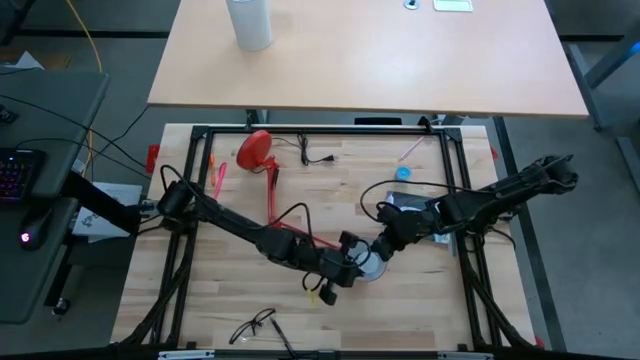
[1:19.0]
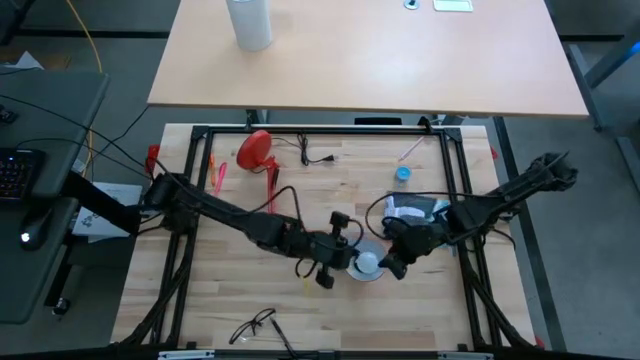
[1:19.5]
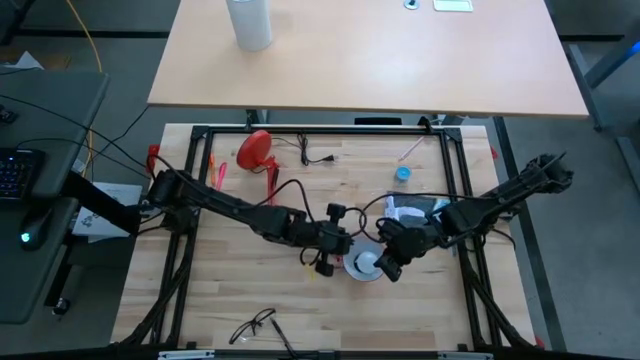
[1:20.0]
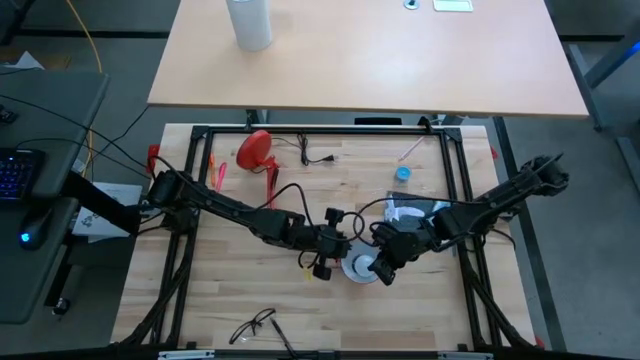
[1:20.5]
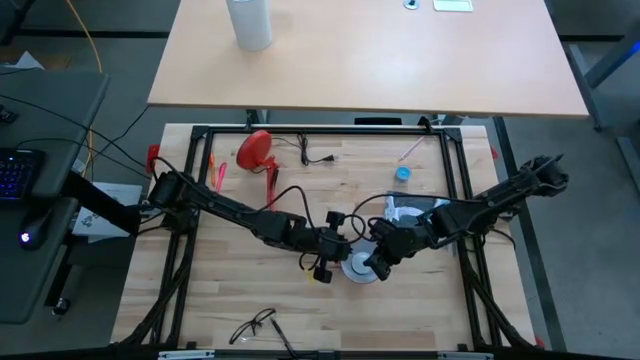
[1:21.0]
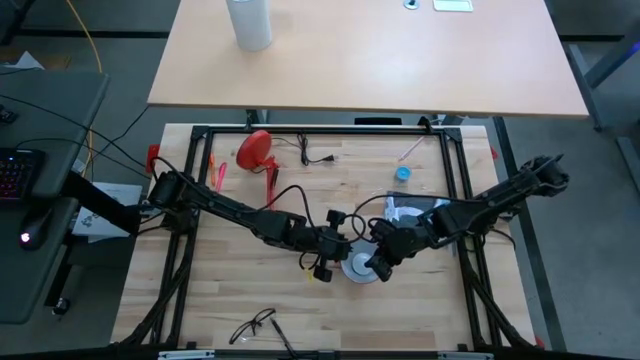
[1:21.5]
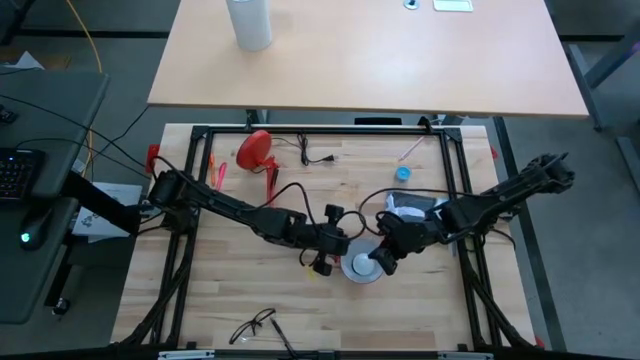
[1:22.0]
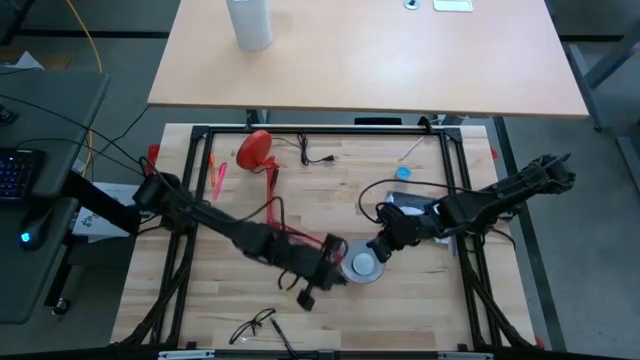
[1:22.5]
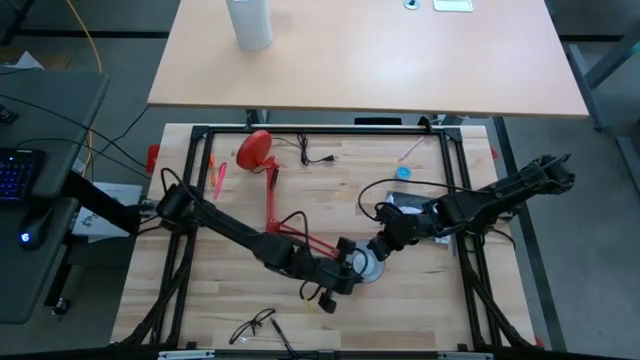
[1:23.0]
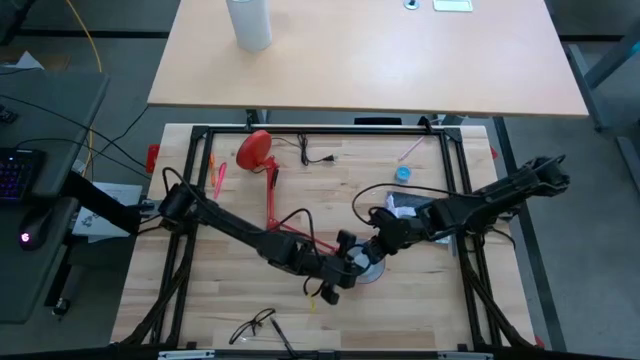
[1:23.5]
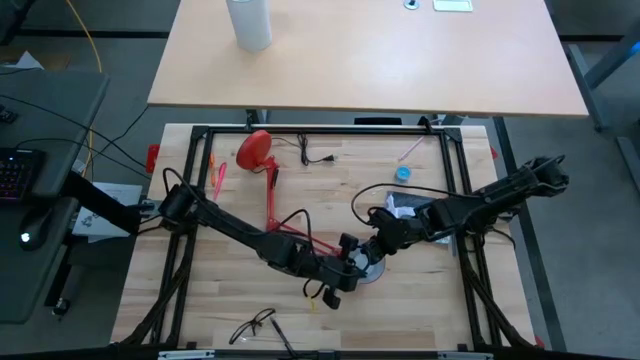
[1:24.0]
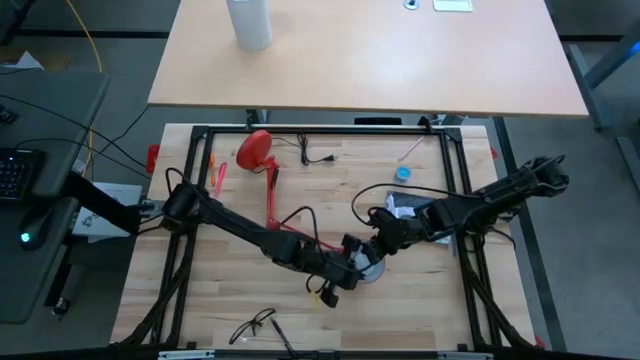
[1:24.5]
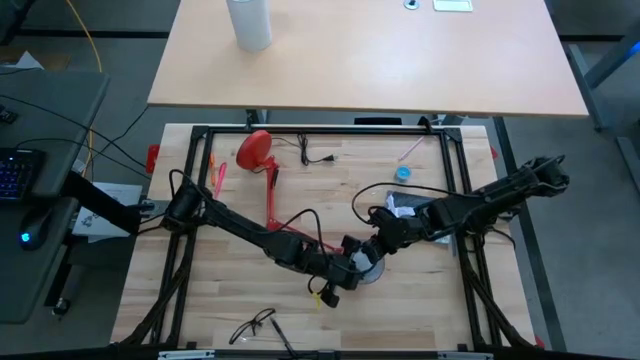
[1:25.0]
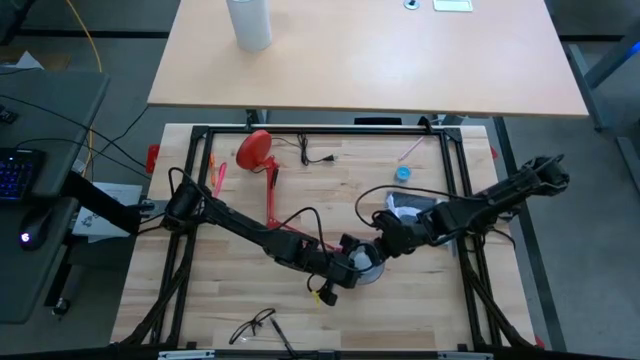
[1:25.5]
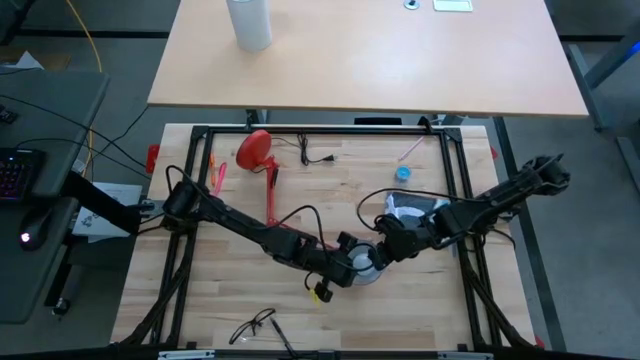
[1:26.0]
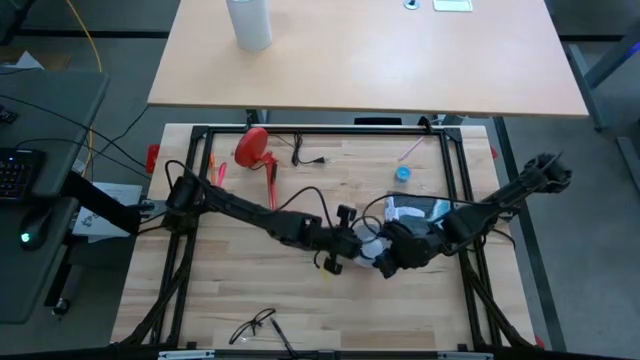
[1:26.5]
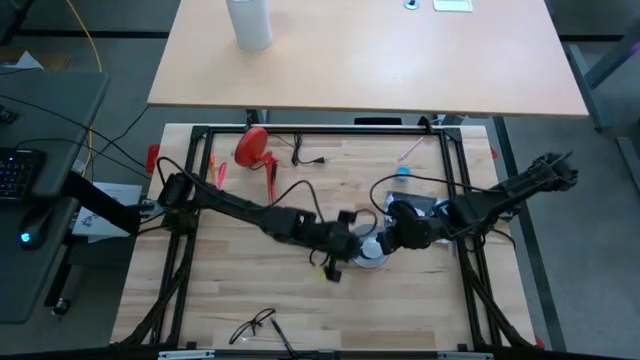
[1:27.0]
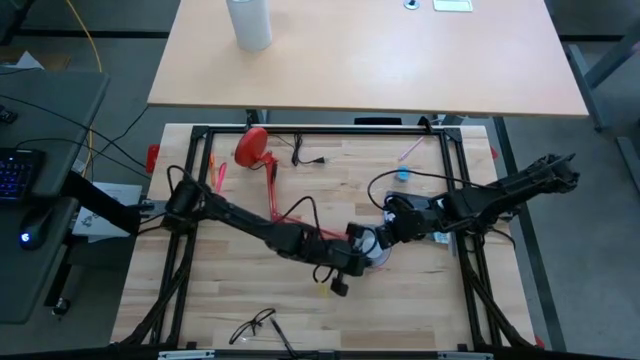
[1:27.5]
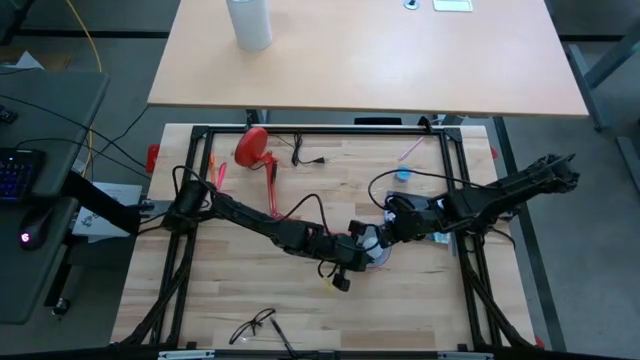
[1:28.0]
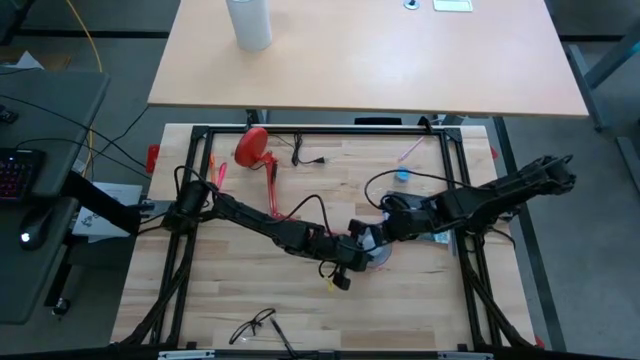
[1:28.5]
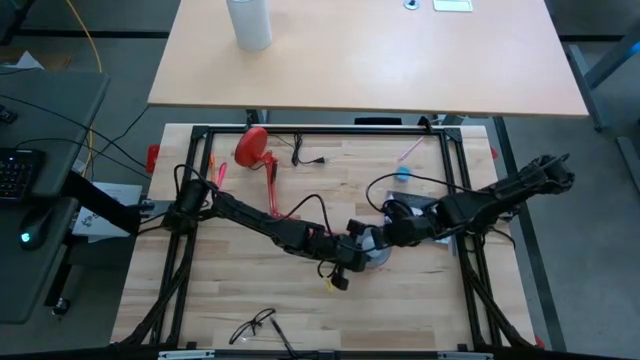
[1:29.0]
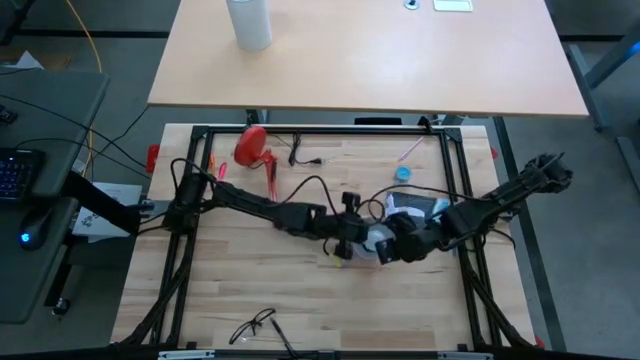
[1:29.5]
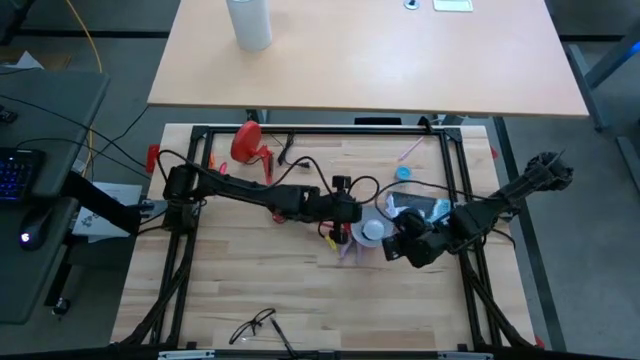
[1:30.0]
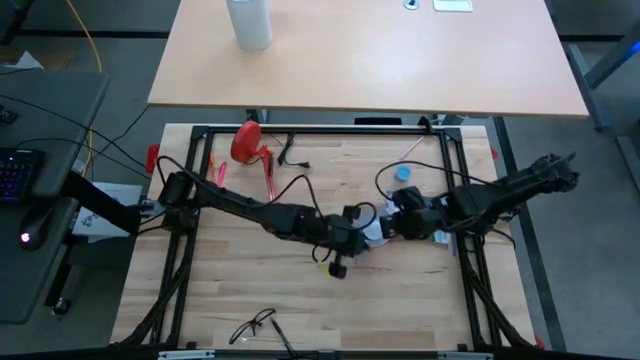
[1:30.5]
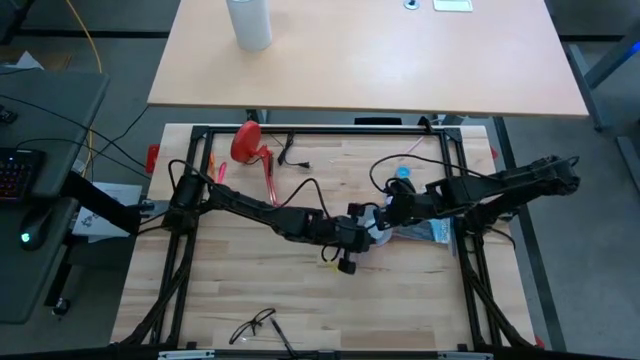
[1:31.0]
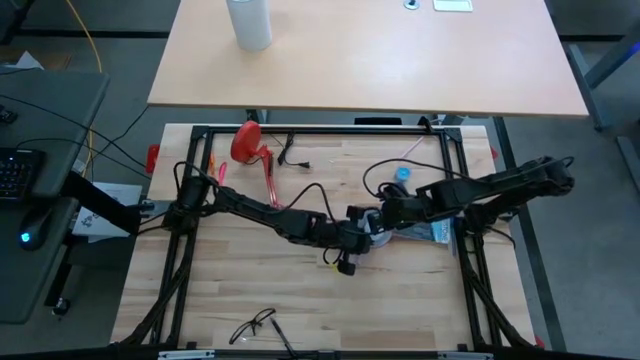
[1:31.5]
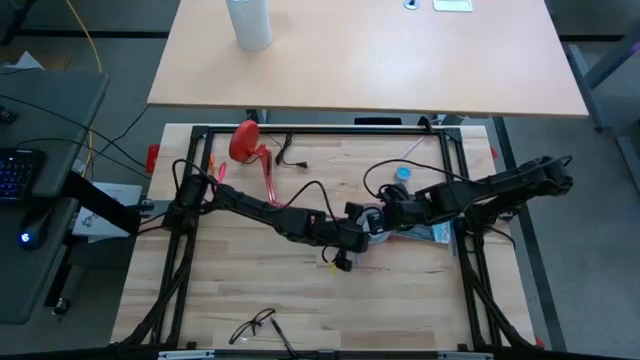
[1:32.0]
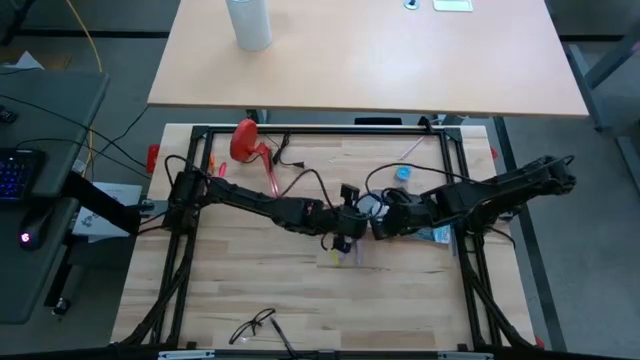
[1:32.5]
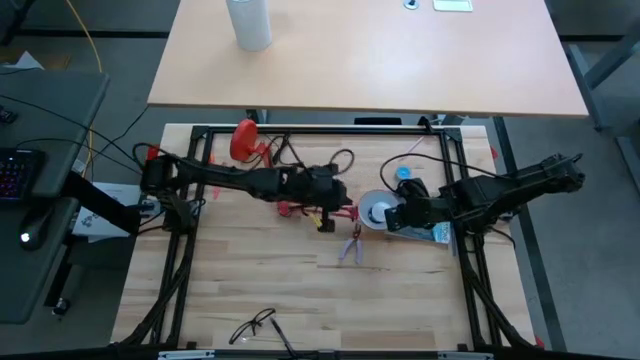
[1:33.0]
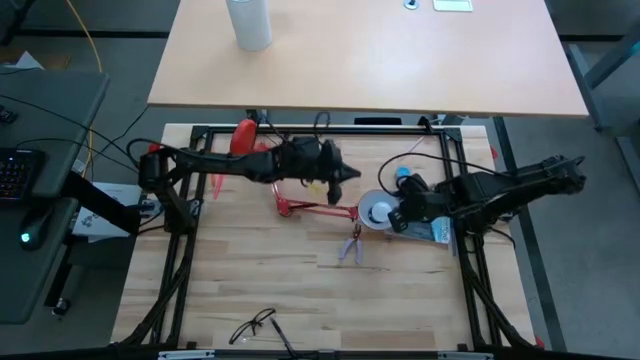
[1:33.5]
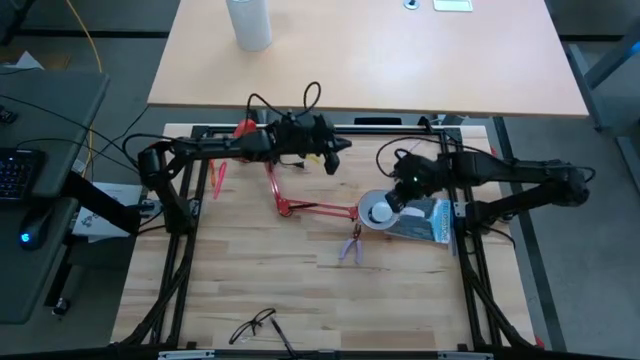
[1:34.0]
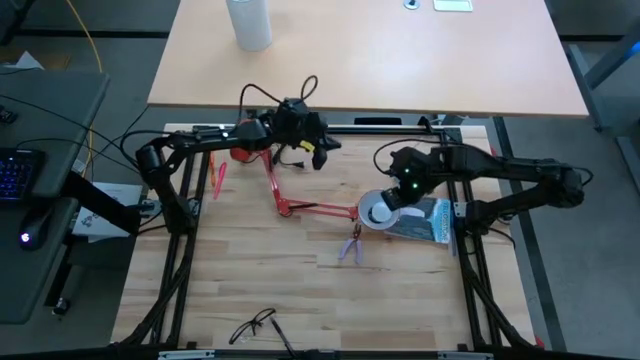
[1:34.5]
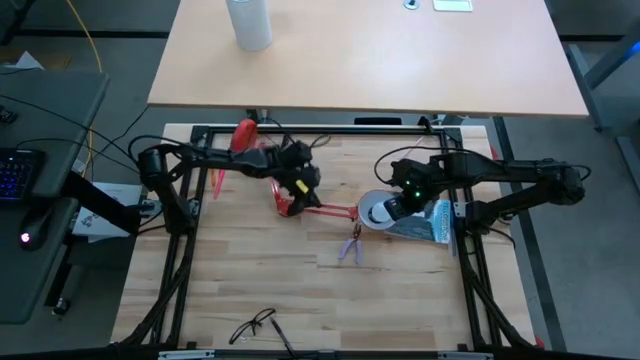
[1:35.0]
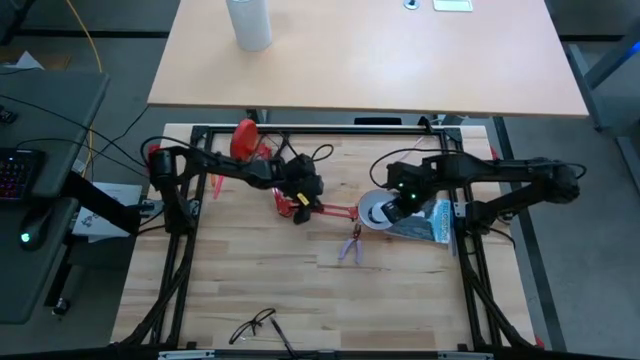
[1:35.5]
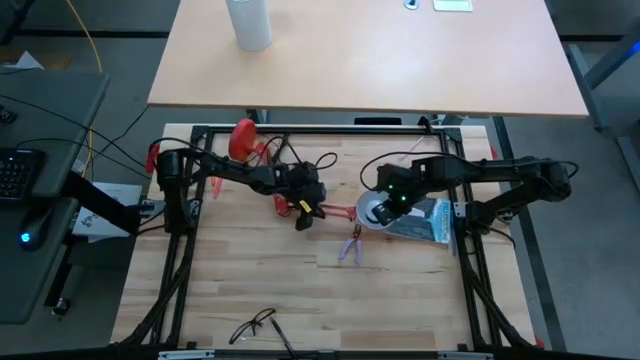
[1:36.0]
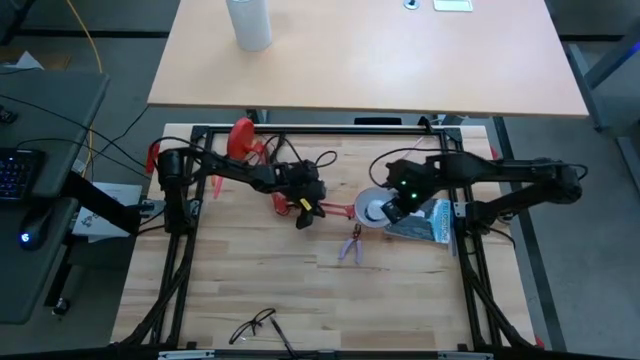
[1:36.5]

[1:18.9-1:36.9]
Task: Screw lightbulb
Insert the lightbulb into the desk lamp

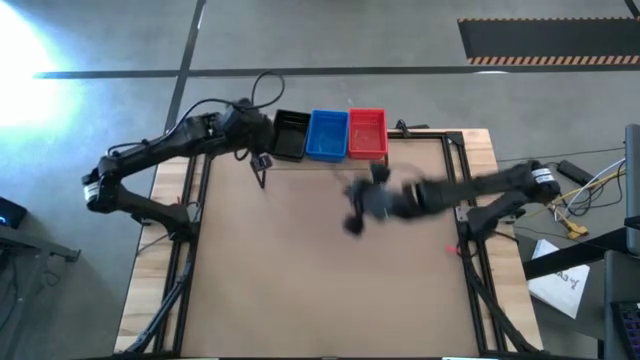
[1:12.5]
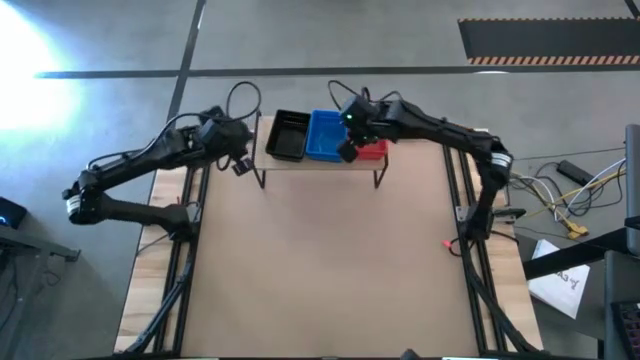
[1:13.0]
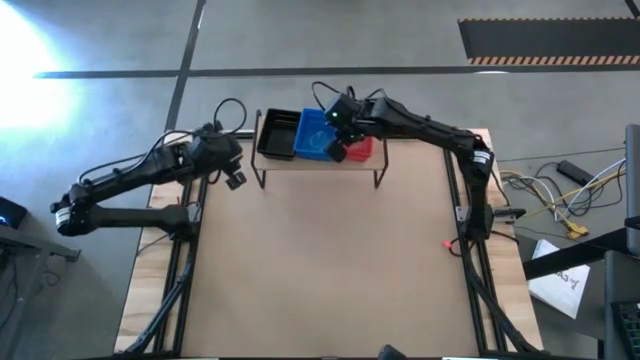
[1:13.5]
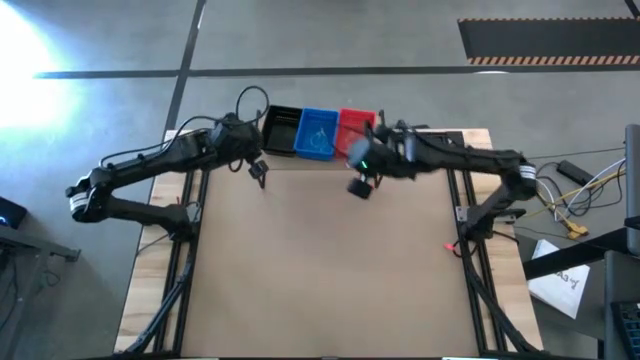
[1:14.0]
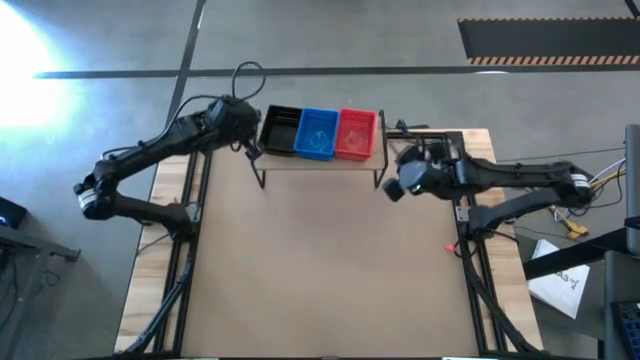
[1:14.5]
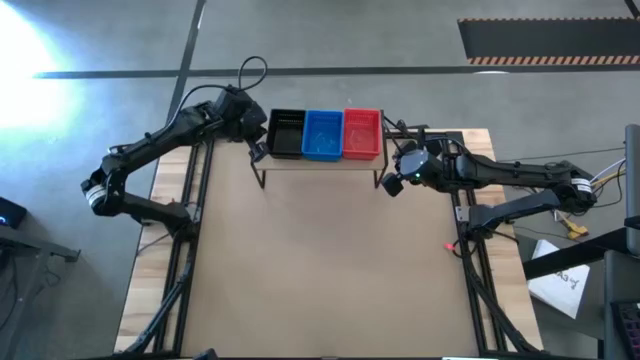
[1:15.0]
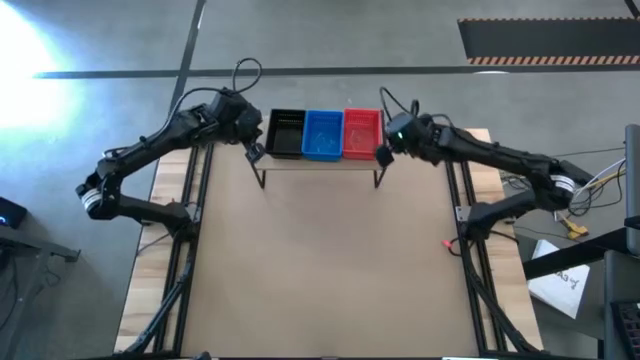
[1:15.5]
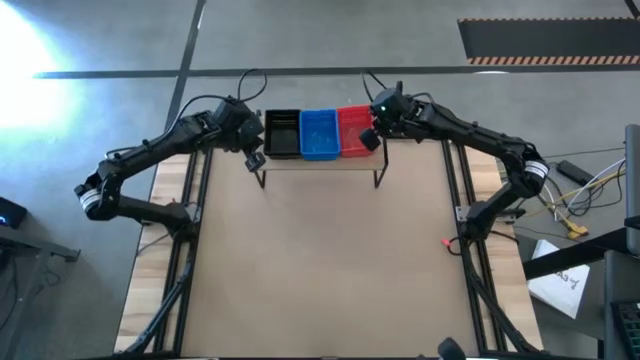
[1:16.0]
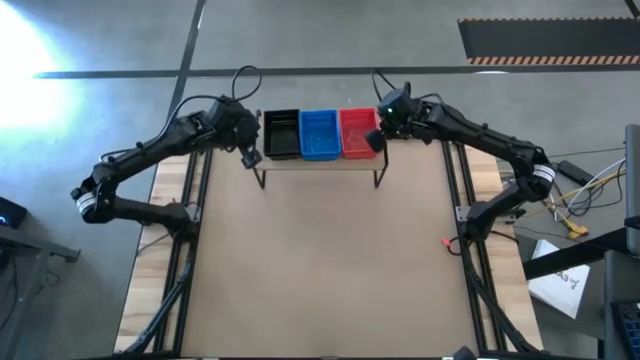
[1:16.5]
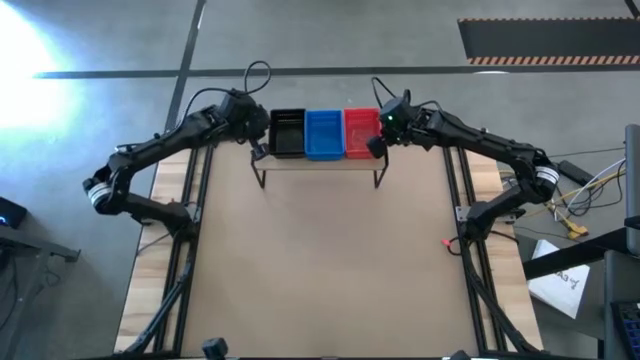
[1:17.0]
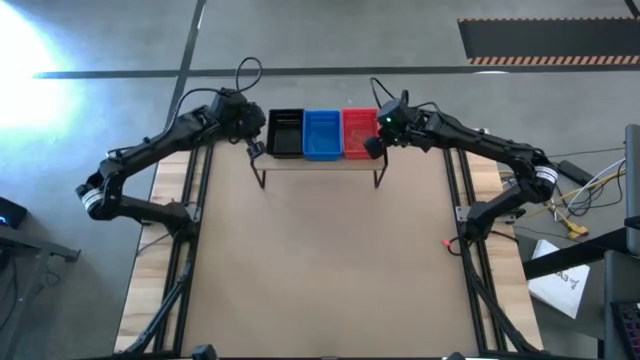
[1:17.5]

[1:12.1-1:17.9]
Task: Stack baskets on shelf by color
Adjust the stacked bins
